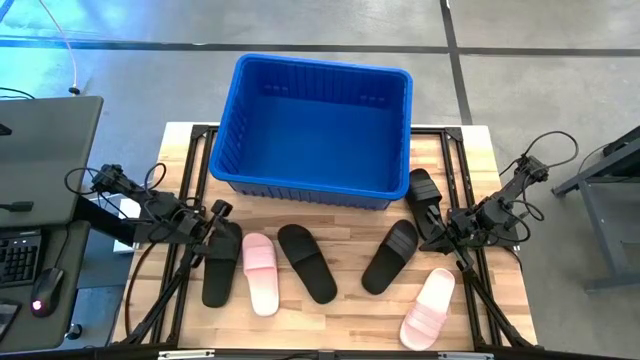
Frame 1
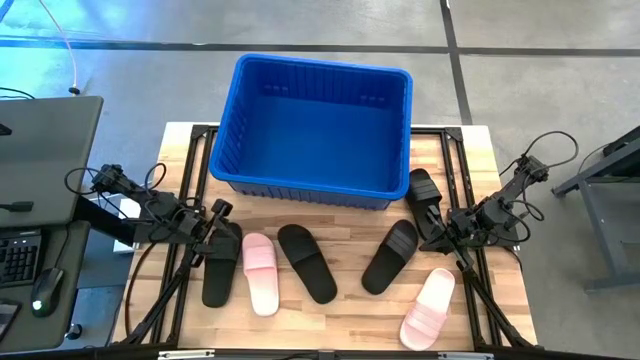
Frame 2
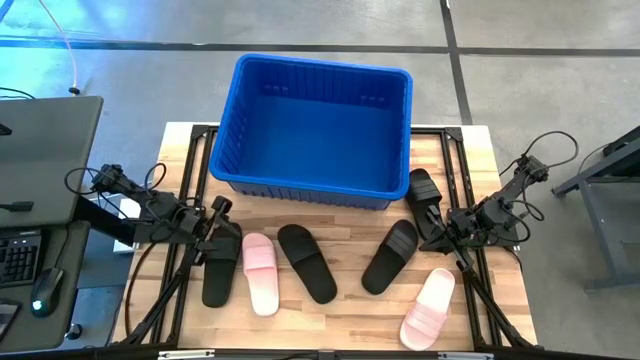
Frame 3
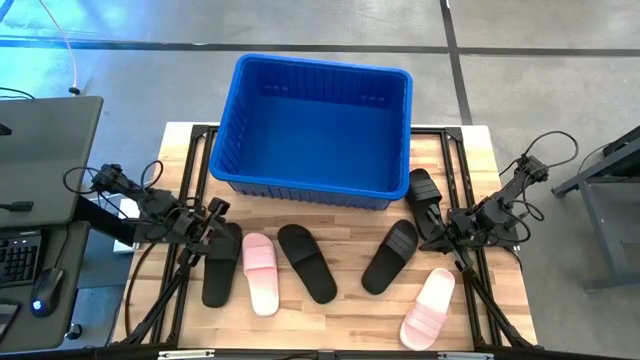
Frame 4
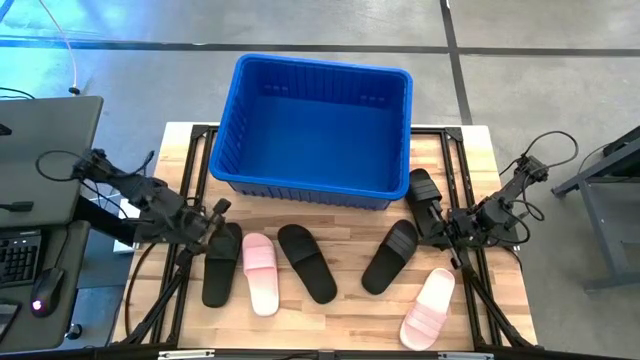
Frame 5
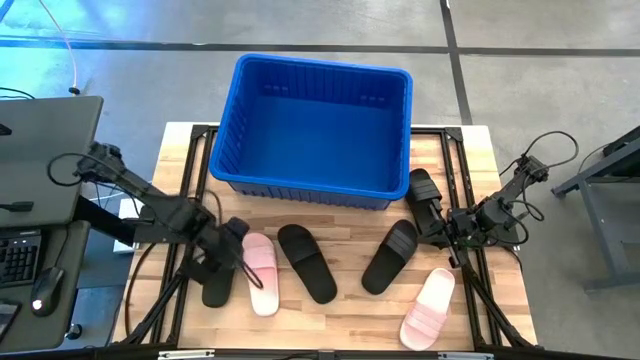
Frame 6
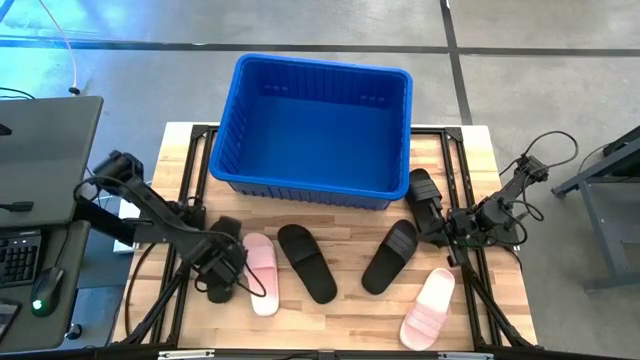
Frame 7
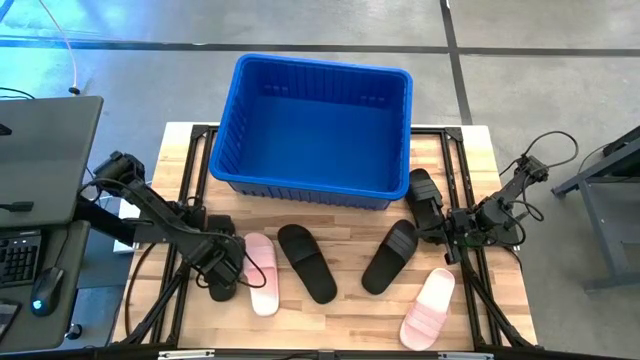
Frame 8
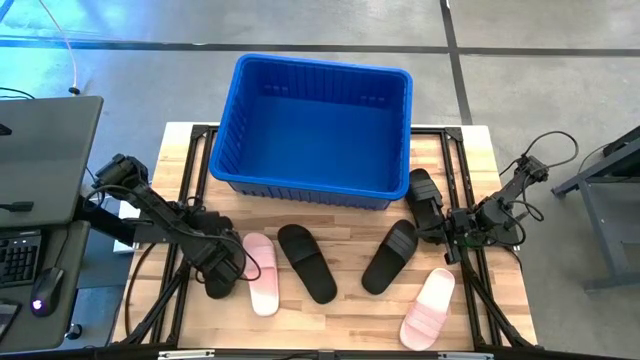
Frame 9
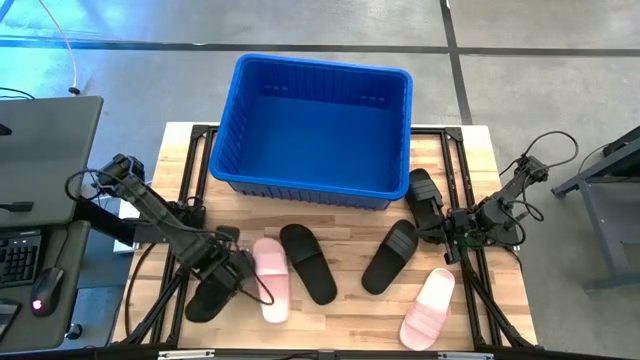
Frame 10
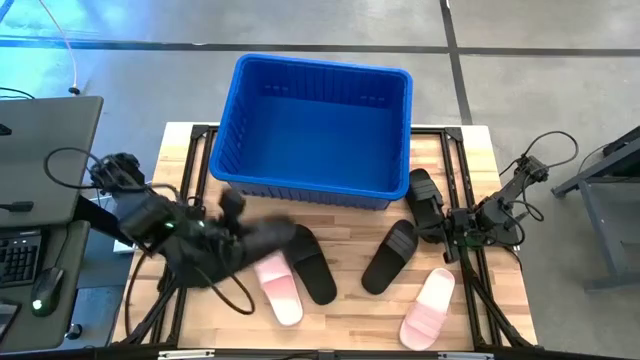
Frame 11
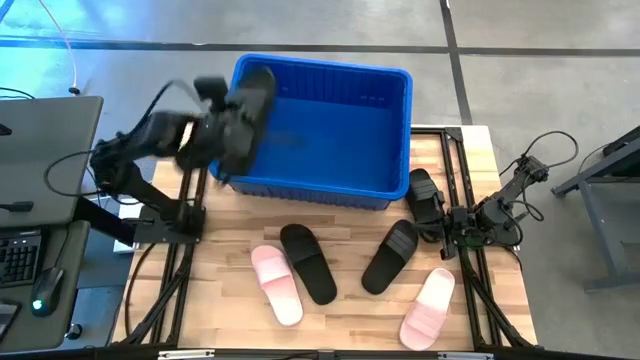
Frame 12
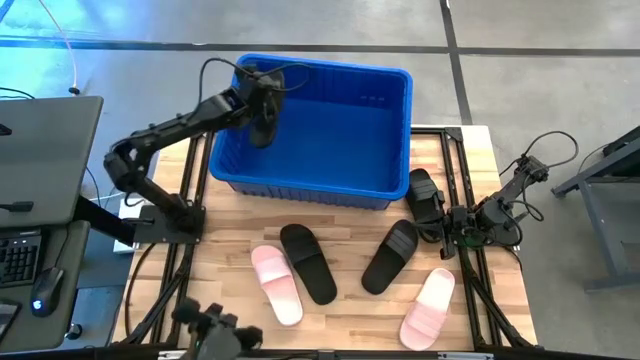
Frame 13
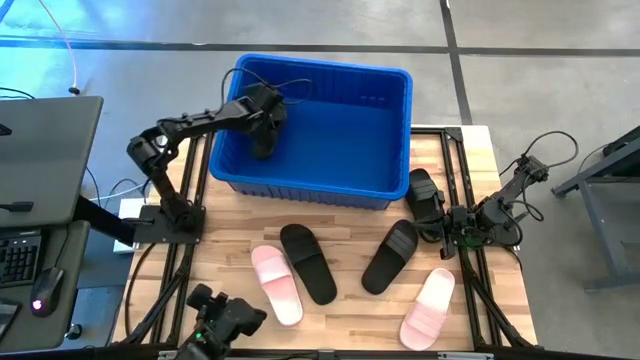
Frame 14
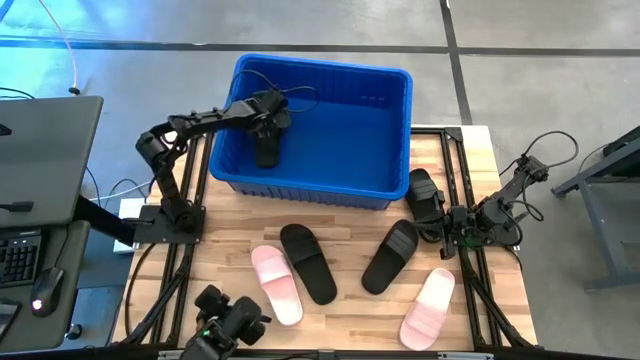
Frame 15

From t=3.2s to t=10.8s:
Task: Pick and place slides into bin
Put the black slide into the blue bin

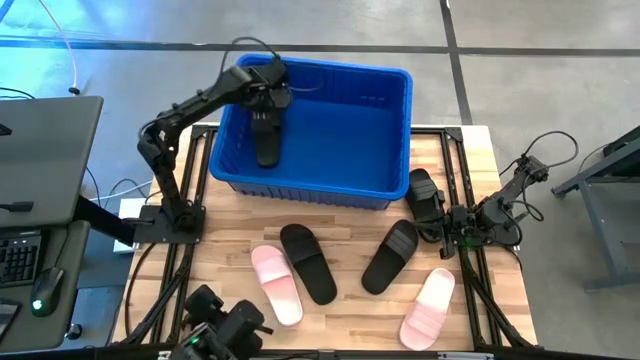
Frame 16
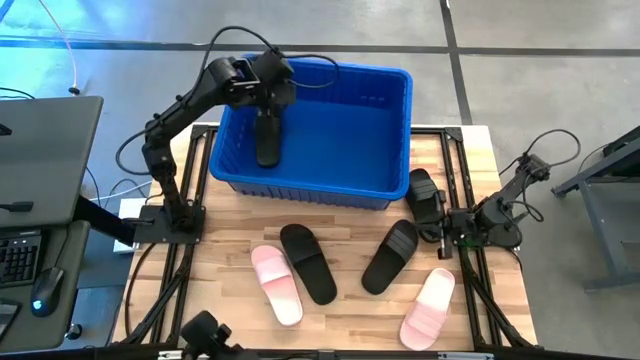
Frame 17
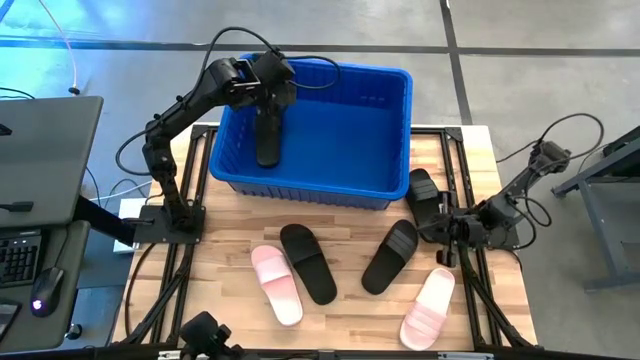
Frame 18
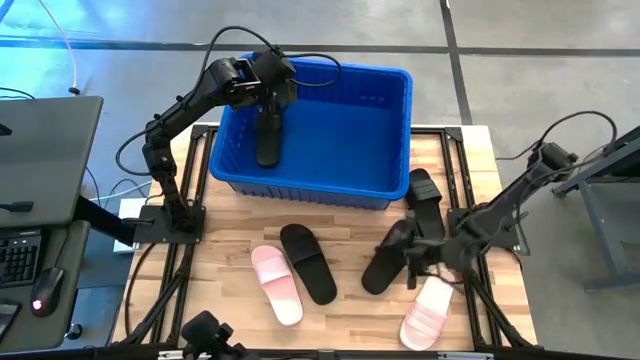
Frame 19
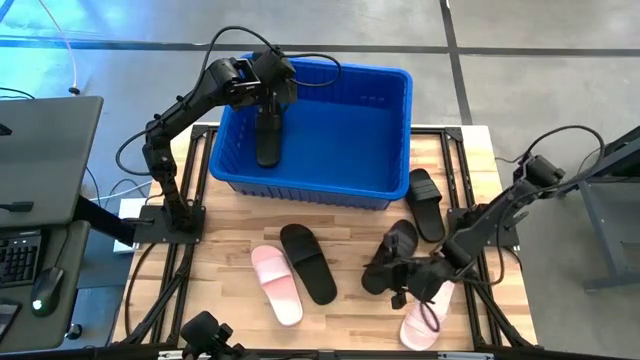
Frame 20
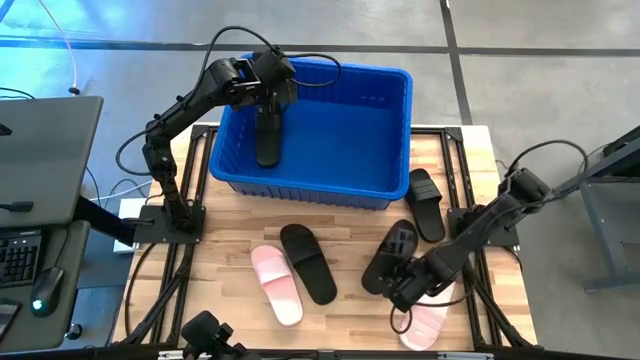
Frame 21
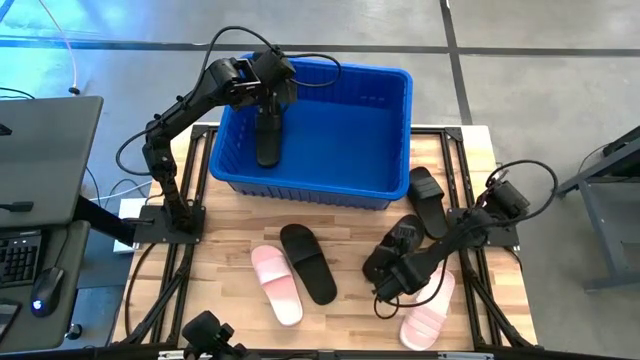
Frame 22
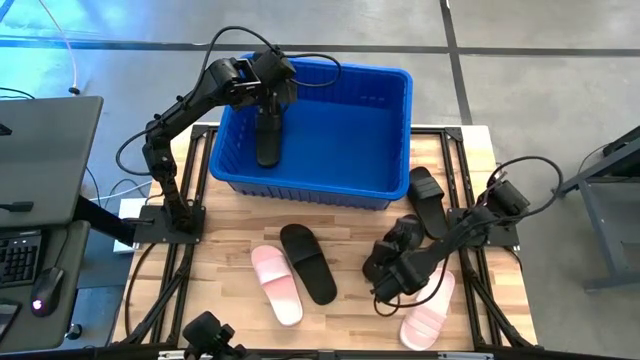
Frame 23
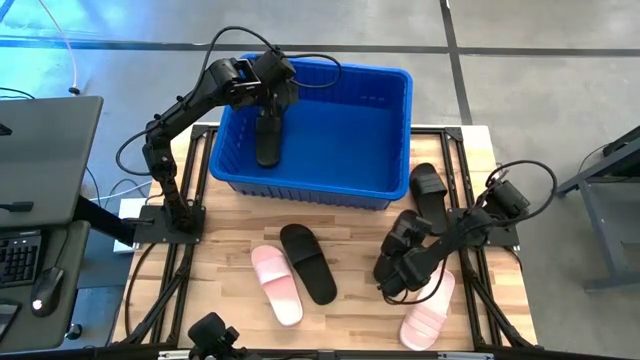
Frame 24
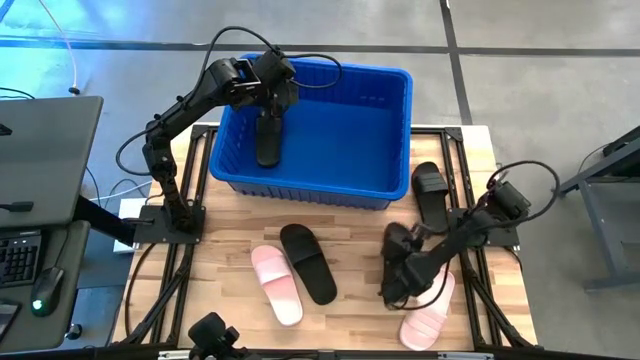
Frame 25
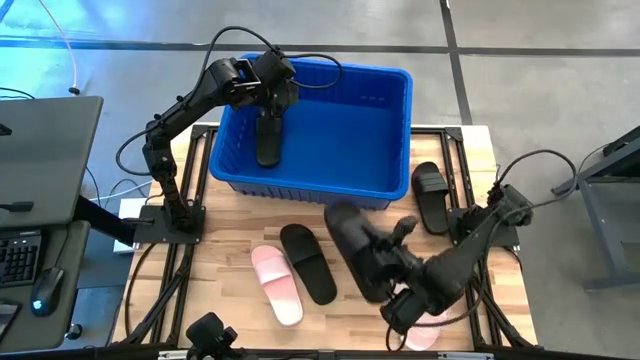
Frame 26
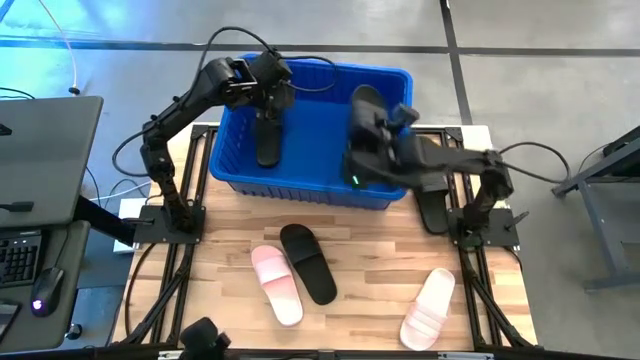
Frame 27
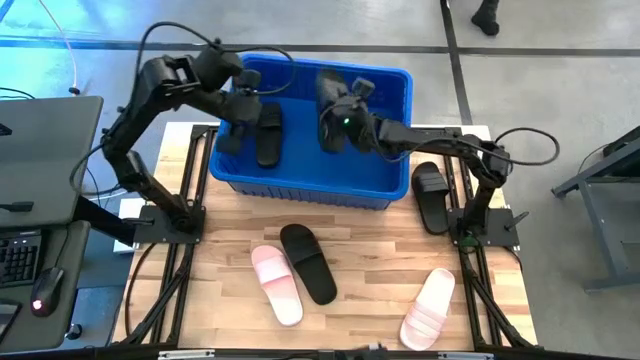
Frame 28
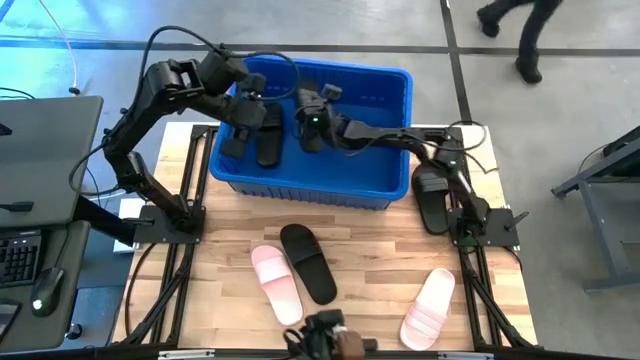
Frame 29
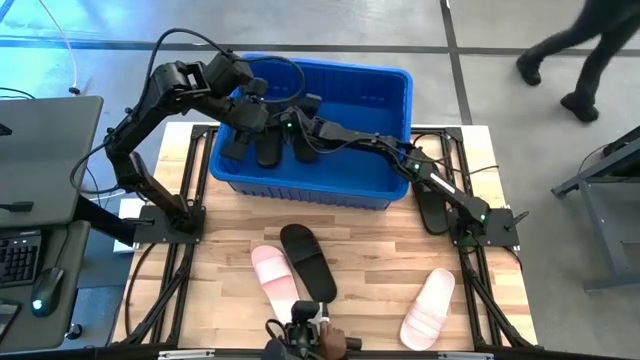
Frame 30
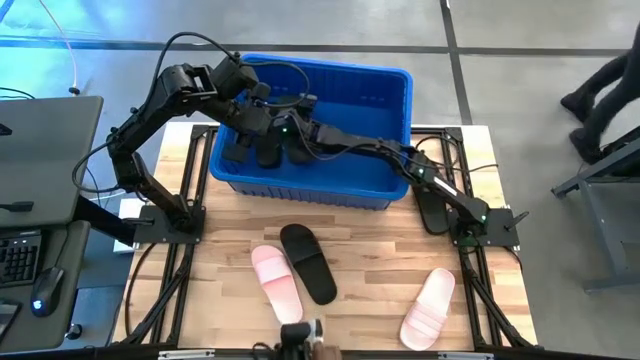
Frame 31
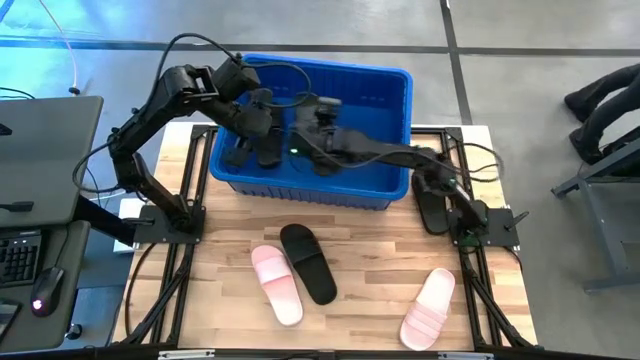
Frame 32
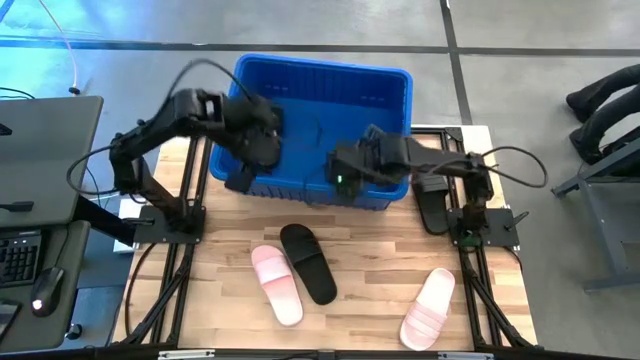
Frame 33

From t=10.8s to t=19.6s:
Put the black slide into the blue bin

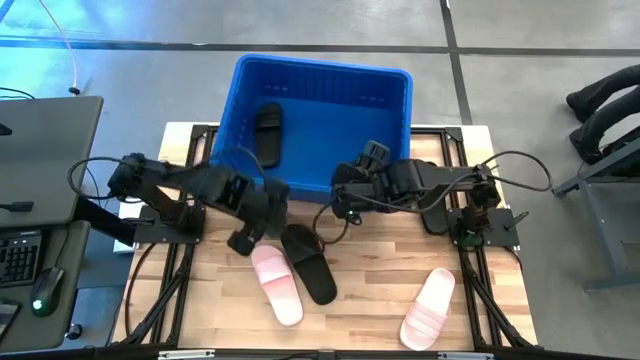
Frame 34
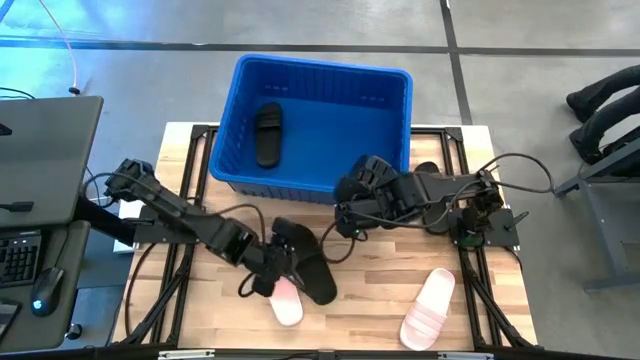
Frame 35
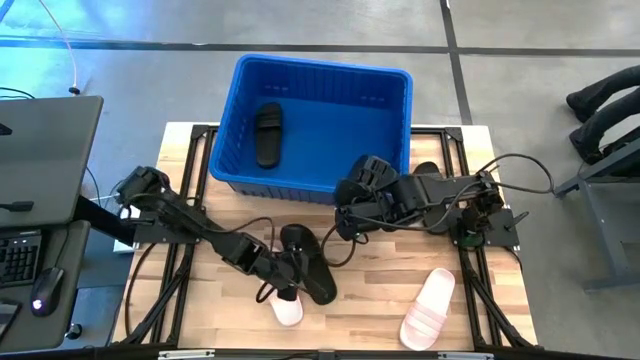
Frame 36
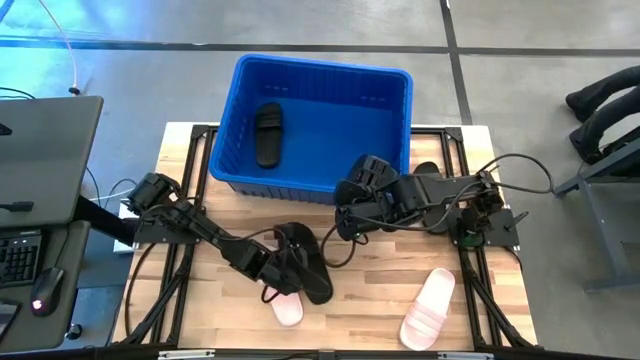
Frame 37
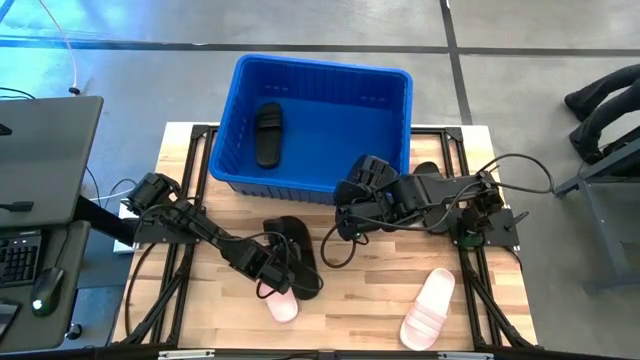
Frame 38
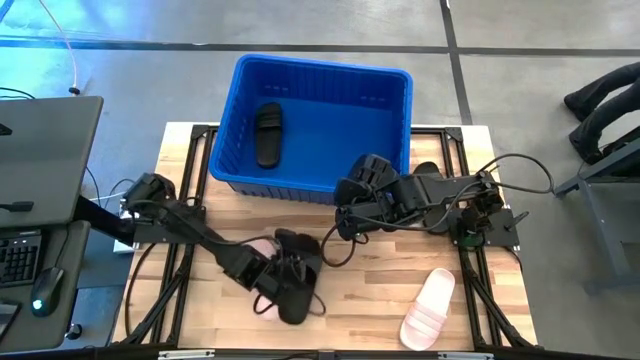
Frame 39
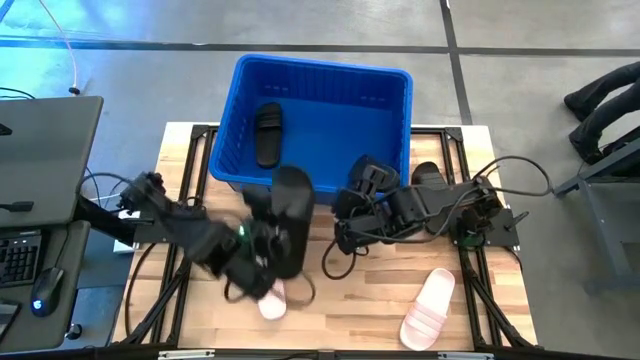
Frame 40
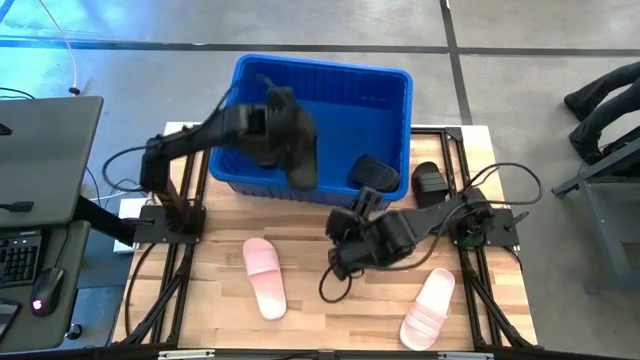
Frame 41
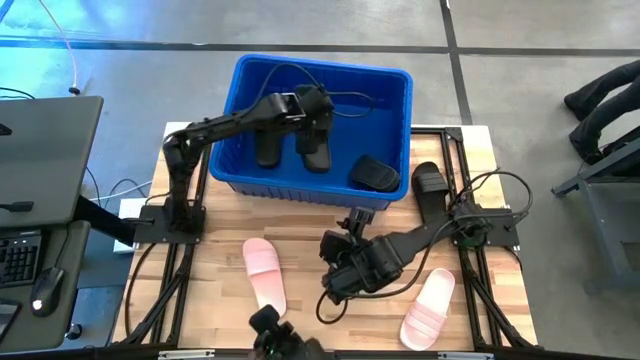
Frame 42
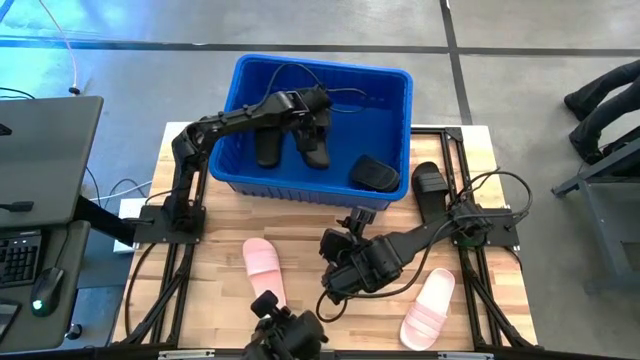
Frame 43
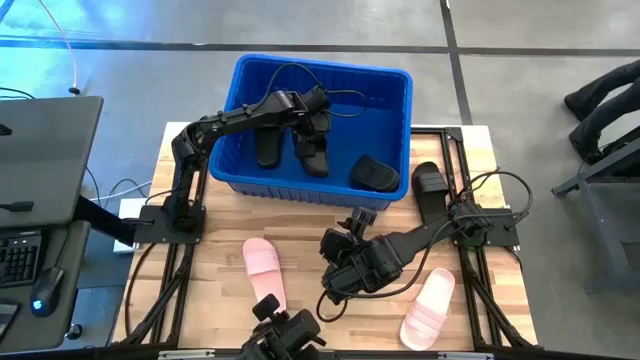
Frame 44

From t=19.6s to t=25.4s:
Put the black slide into the blue bin
